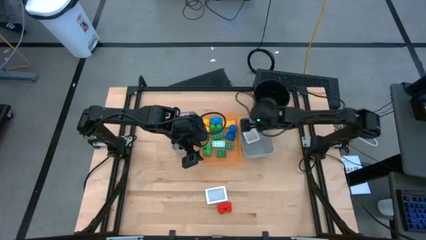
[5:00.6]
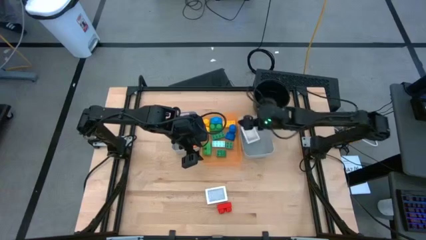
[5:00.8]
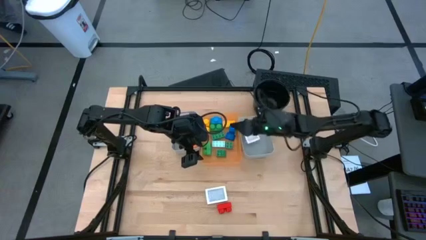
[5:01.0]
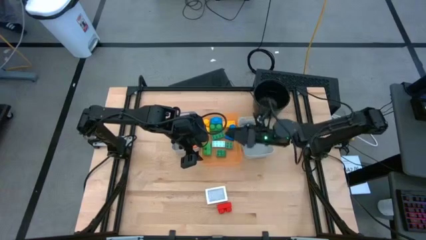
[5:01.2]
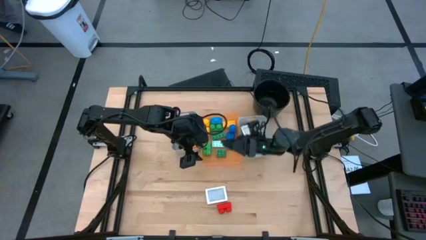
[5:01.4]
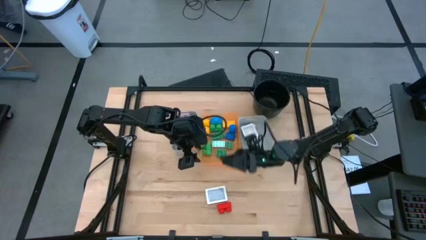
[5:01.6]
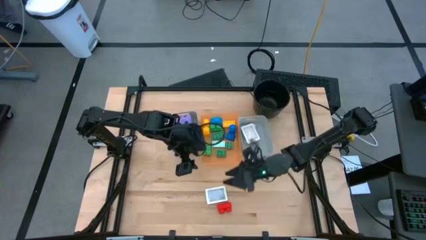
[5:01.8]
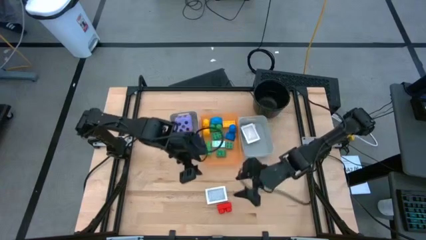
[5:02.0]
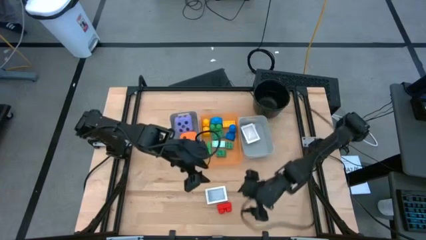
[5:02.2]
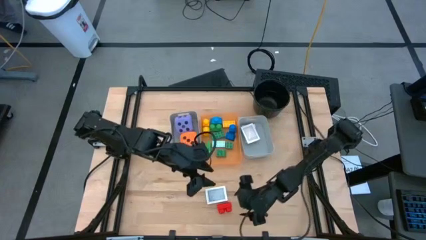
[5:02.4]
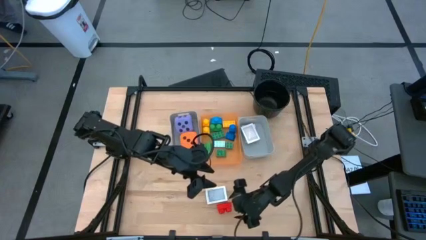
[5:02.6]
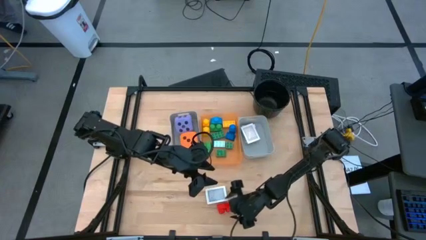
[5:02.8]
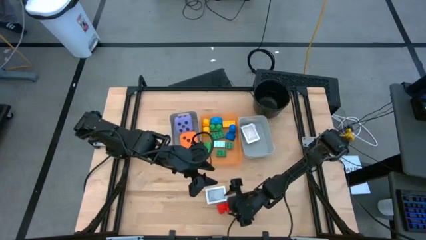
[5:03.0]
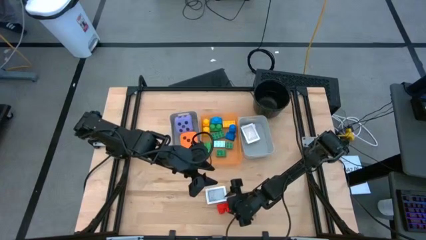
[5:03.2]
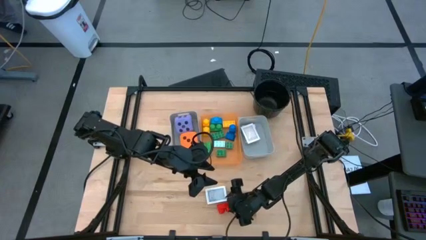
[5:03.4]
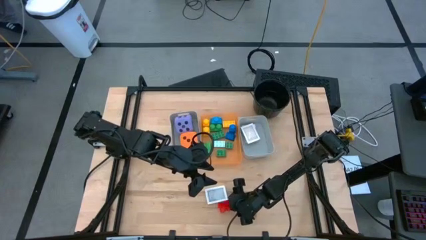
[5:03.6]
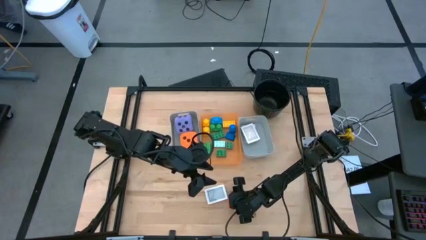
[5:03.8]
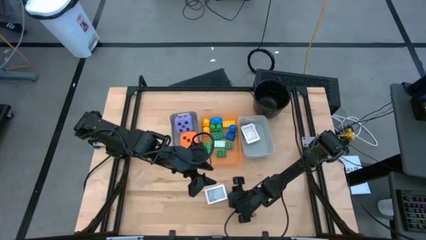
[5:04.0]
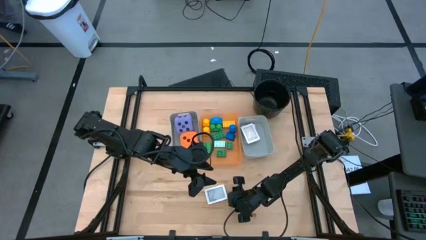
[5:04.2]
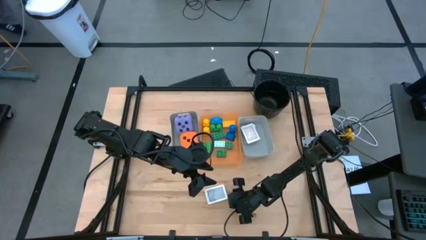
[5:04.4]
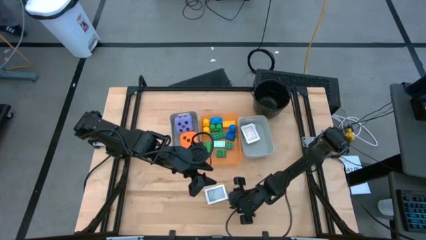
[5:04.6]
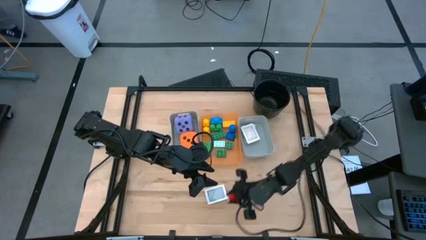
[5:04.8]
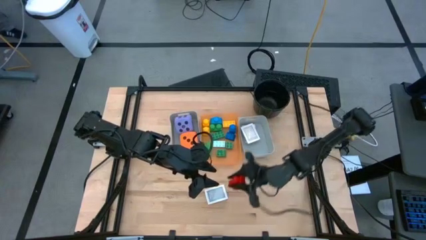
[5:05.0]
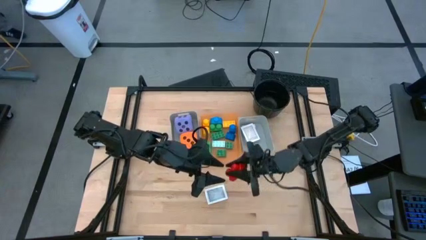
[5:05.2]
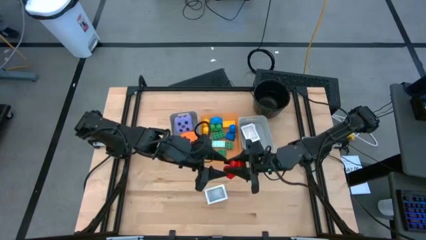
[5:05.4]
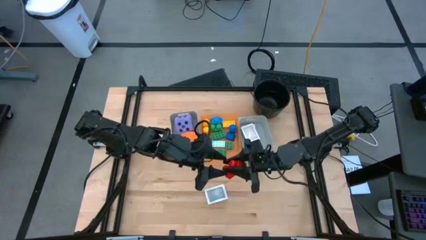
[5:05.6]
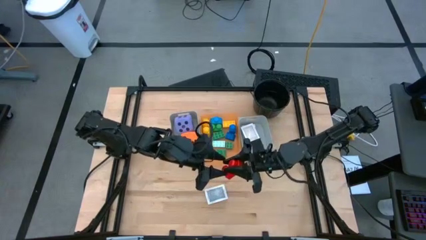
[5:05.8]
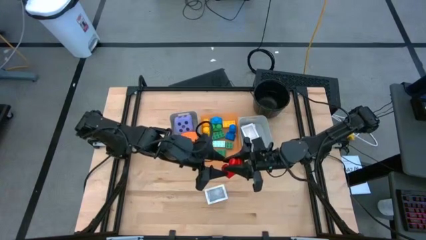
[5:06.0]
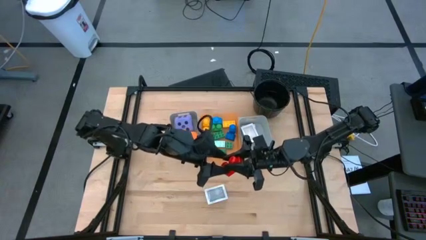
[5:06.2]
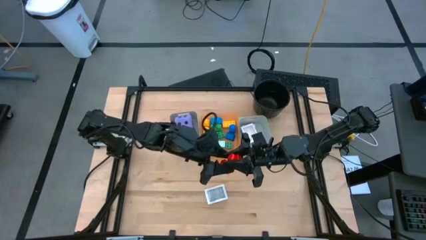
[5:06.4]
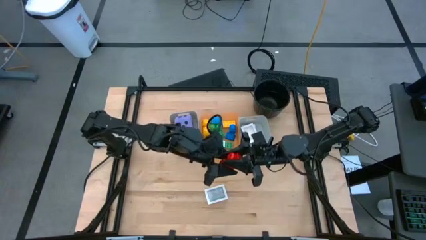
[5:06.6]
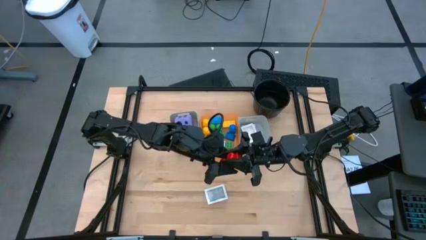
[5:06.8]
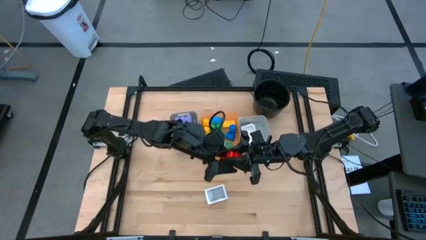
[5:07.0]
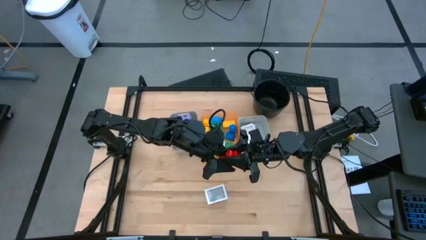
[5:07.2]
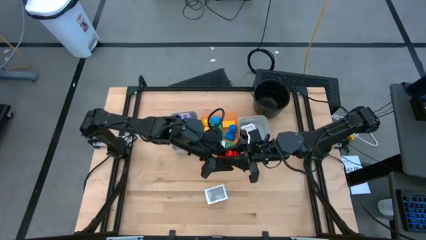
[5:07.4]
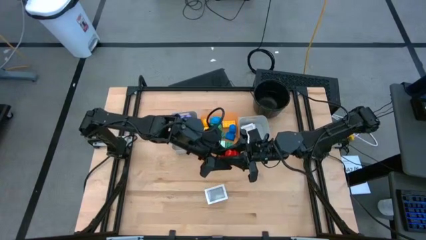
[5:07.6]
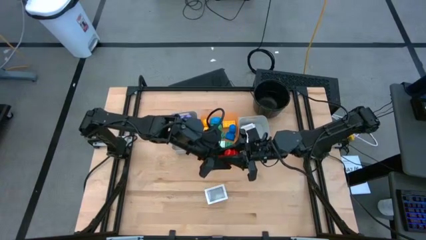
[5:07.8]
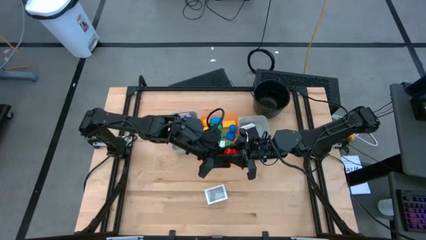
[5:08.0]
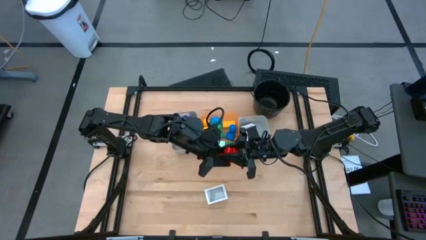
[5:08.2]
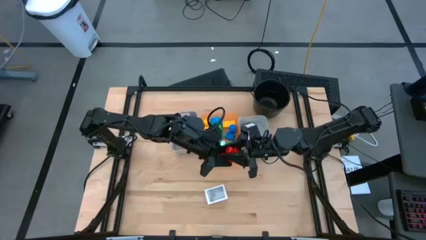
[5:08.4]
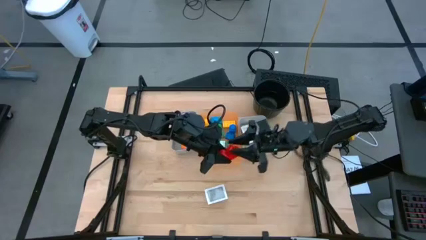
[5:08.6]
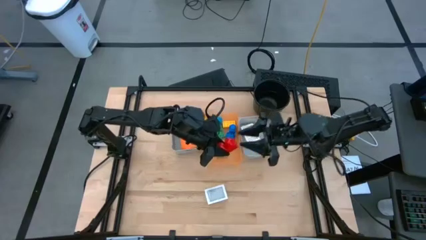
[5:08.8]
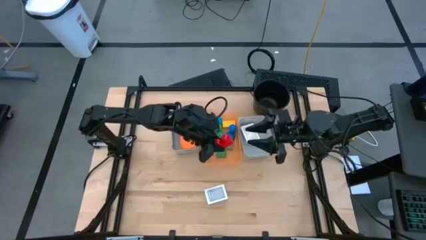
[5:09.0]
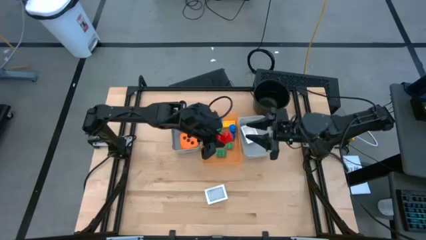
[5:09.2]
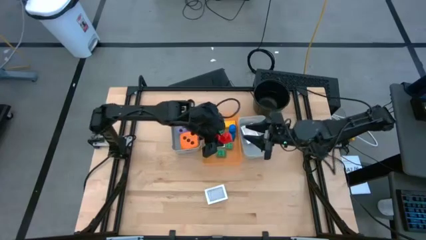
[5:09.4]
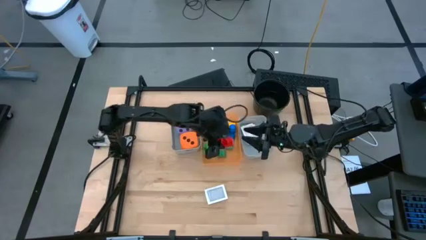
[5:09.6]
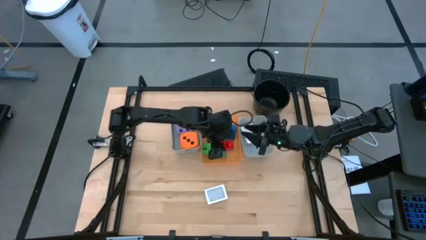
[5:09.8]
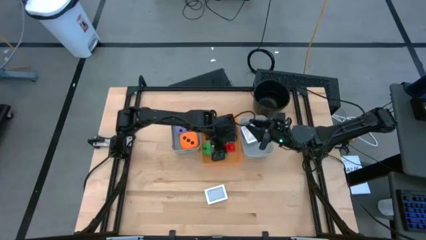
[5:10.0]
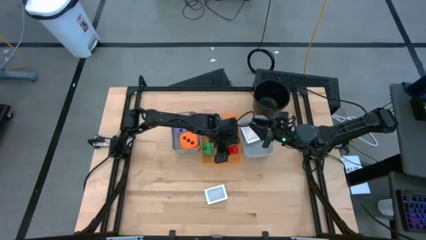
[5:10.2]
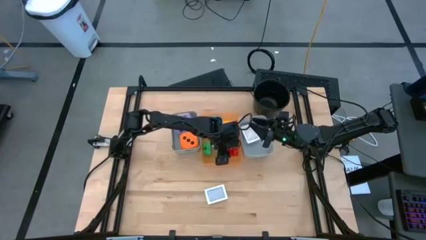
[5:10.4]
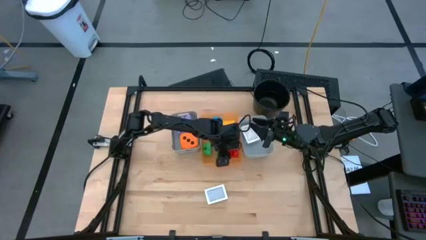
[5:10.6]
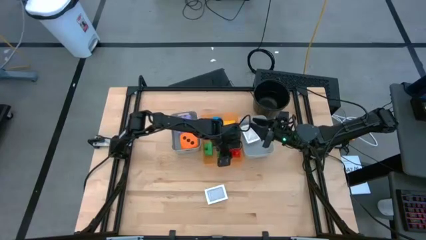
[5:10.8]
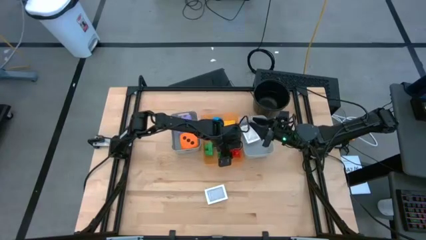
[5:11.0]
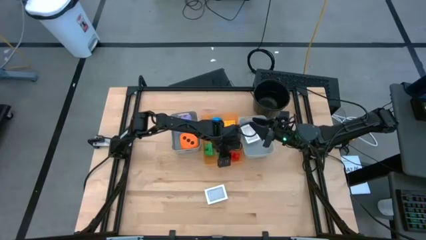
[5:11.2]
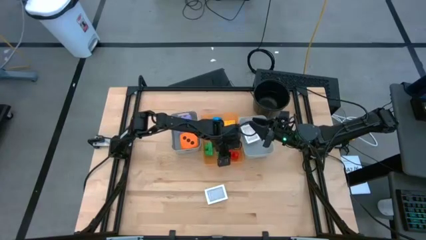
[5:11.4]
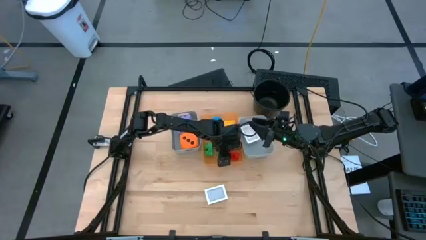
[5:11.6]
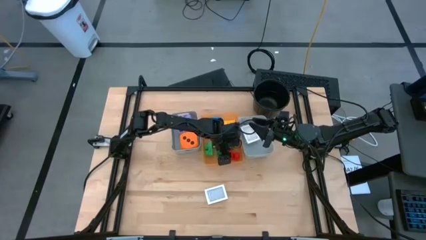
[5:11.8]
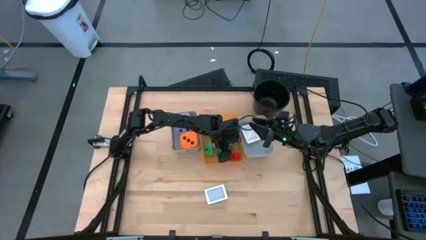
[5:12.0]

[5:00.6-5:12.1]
Task: Pick & Place Toys
Put the red game piece into the orange bin

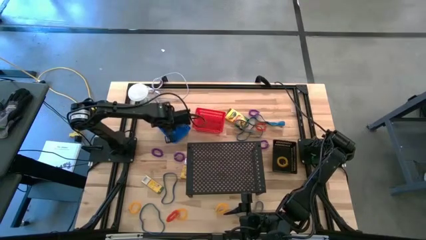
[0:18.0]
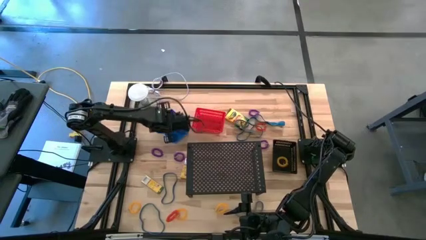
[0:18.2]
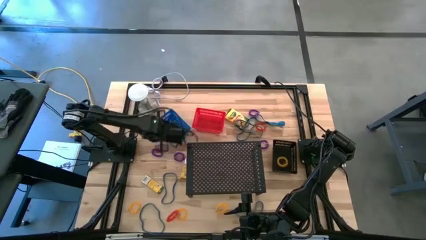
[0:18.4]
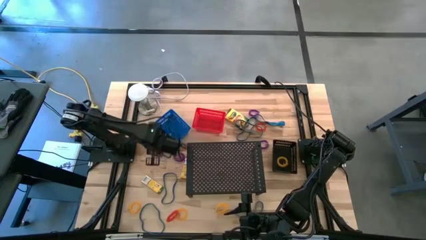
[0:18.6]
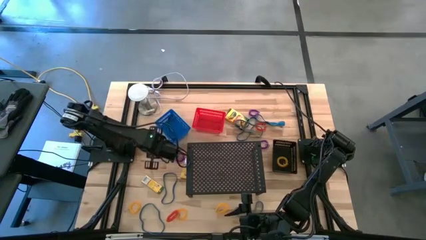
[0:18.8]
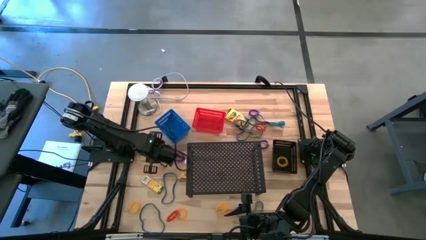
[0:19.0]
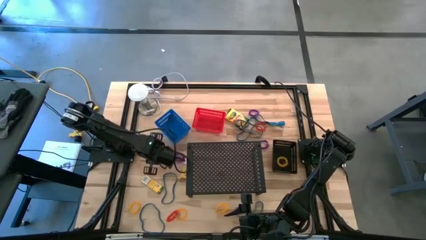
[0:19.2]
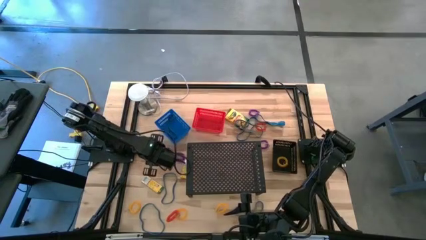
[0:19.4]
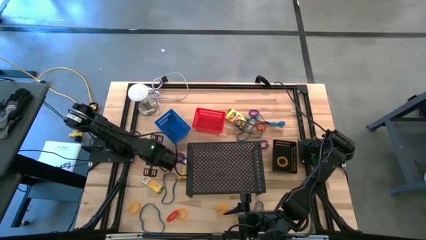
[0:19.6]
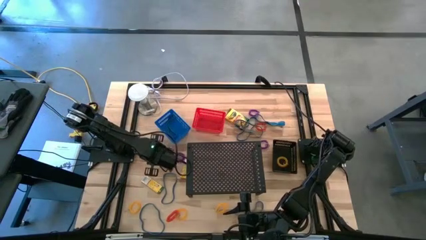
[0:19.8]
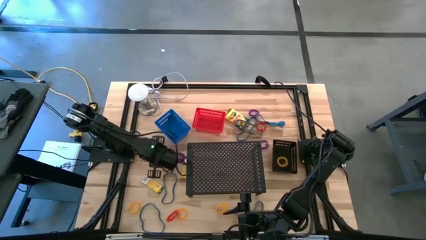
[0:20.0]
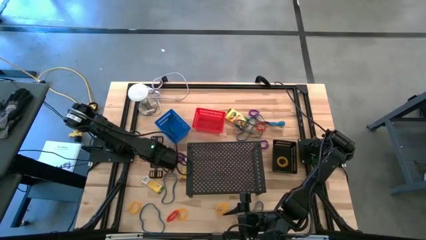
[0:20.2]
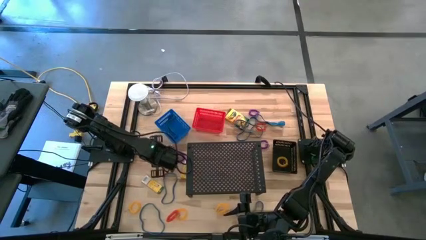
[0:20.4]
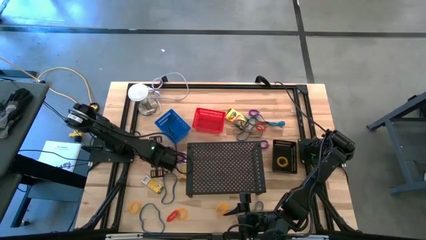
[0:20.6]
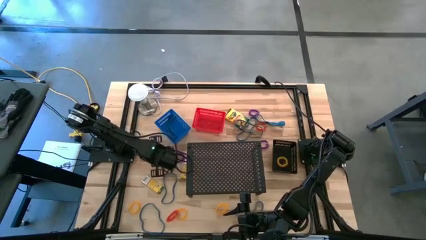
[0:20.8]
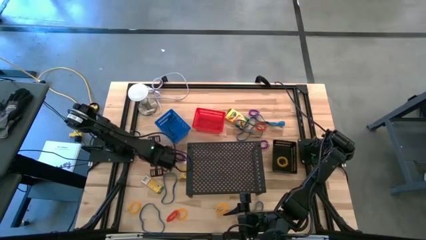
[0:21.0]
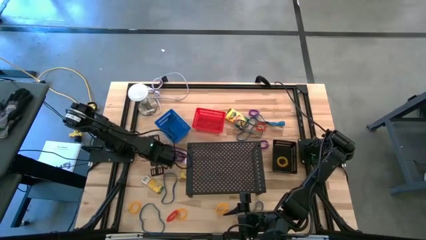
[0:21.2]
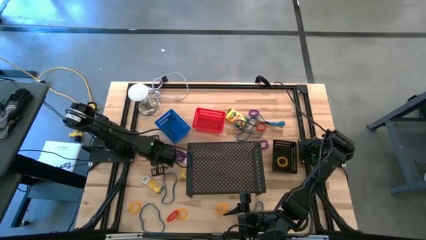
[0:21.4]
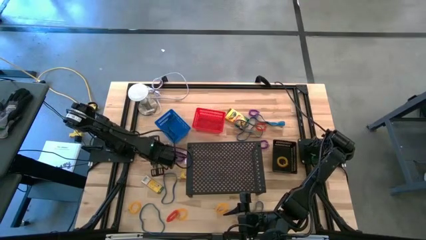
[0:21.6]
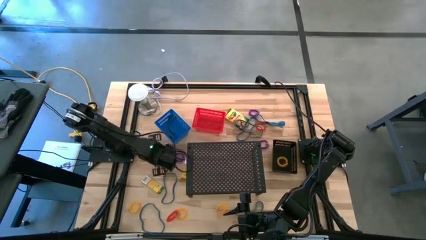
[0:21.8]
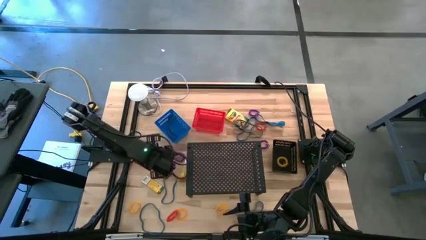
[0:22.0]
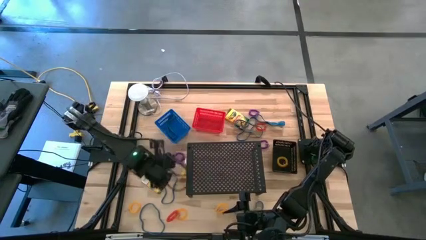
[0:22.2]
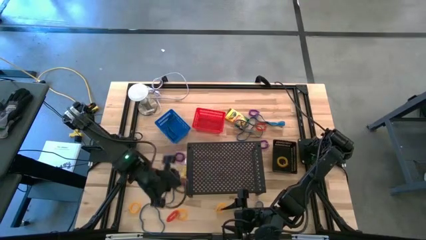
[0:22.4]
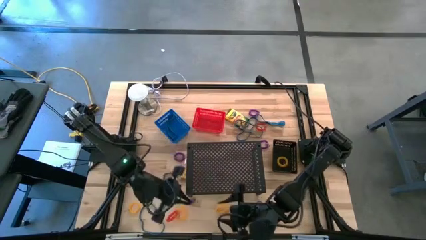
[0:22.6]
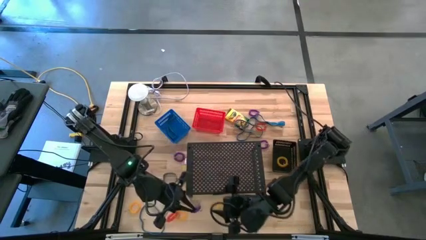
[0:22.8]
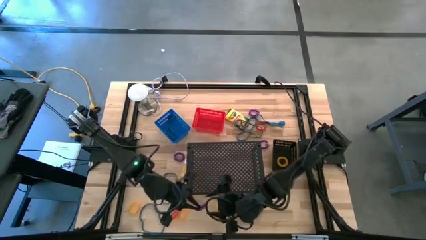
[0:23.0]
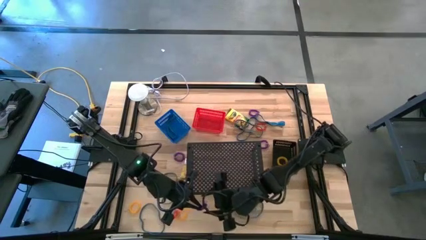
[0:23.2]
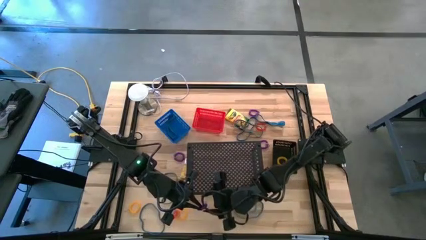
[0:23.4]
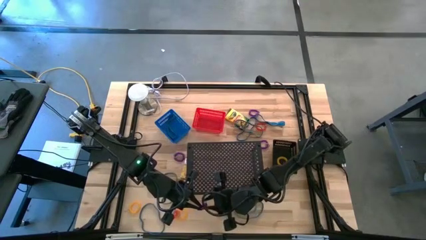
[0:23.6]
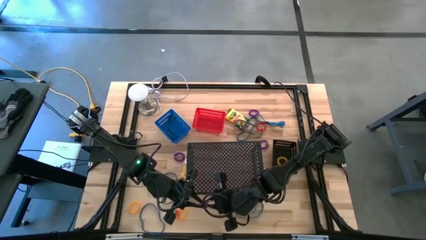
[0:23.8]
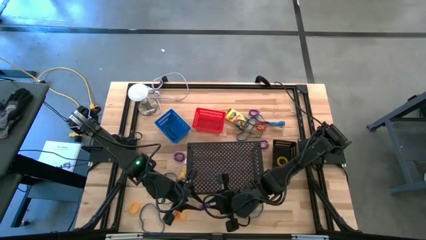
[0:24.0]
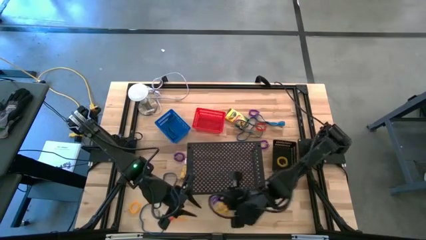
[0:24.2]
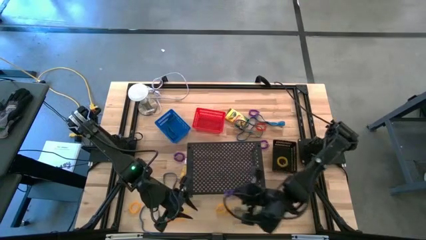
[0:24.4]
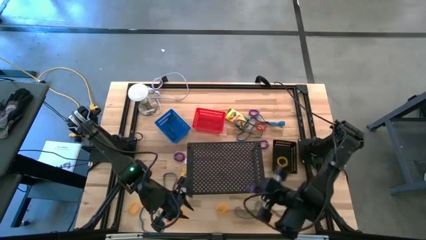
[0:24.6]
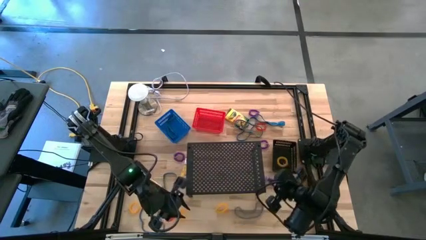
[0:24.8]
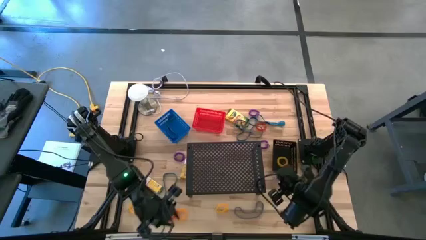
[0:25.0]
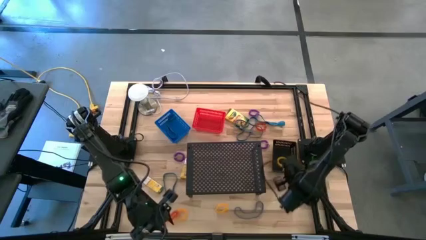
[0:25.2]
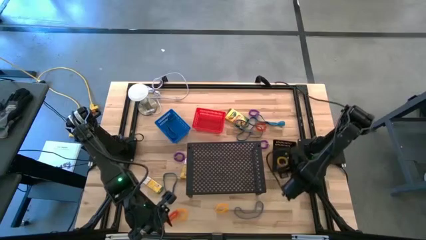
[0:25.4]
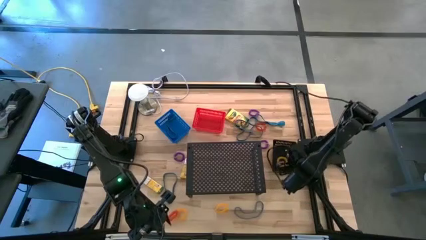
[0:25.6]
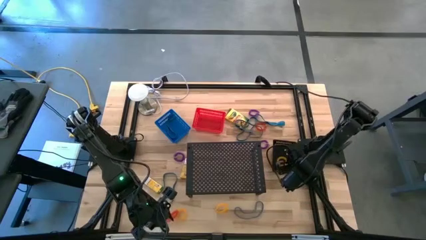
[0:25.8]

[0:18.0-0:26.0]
Task: Pick & Place Office Desk Supplies
Put the purple spring keychain into the black bin
